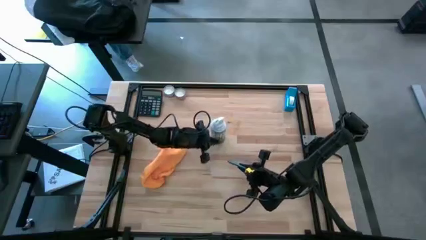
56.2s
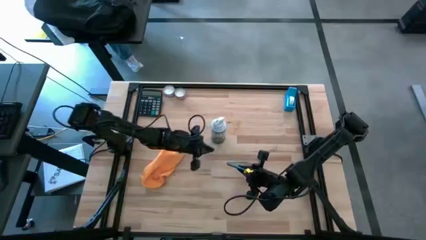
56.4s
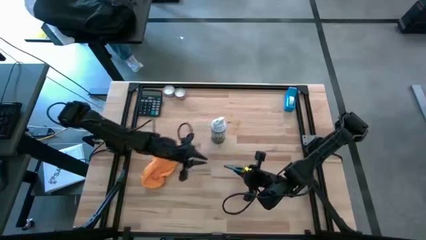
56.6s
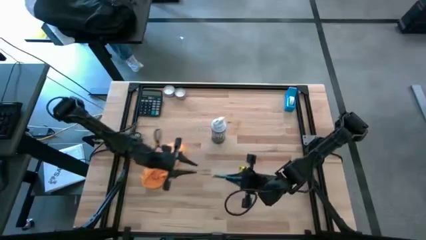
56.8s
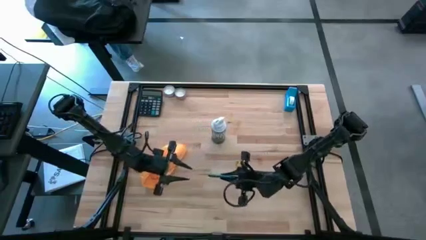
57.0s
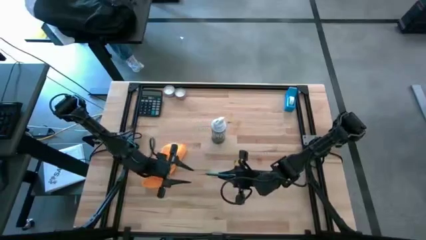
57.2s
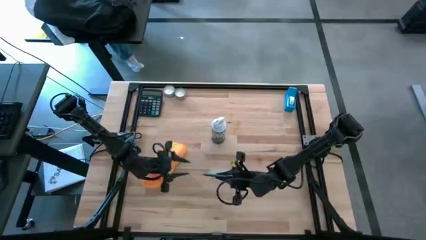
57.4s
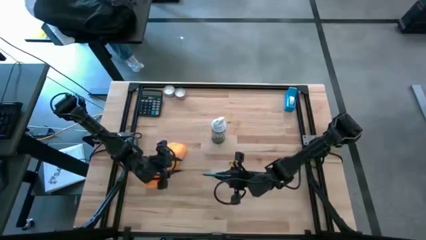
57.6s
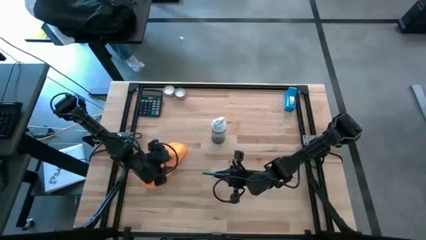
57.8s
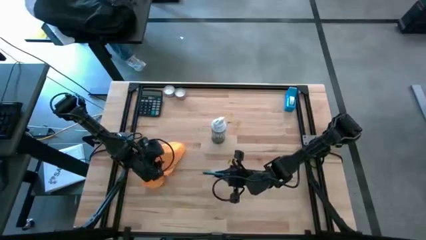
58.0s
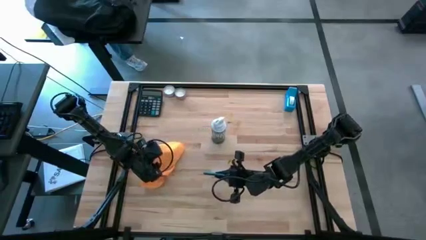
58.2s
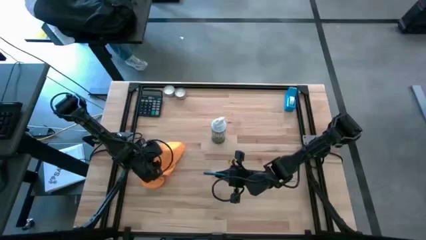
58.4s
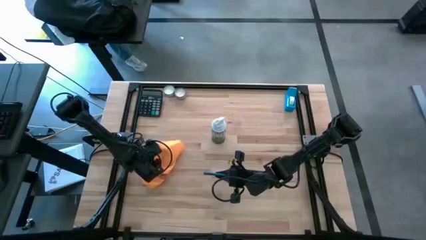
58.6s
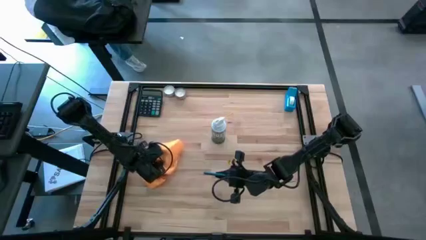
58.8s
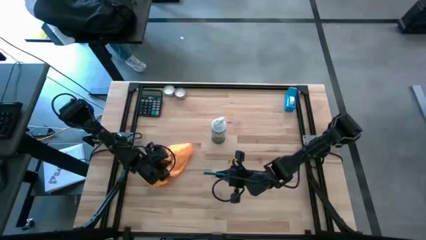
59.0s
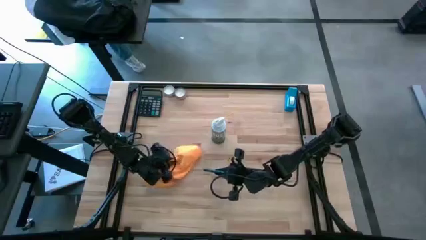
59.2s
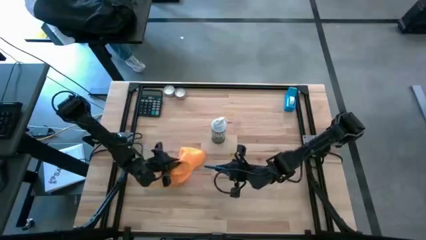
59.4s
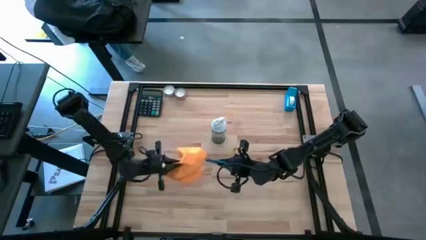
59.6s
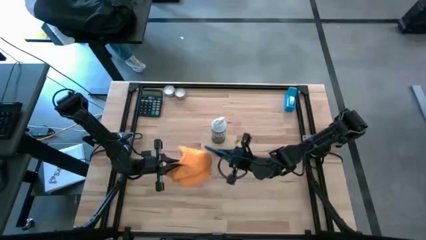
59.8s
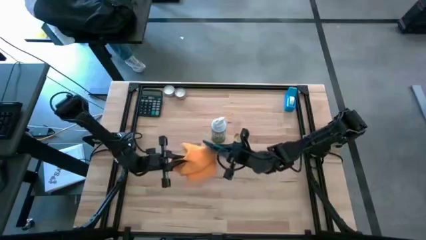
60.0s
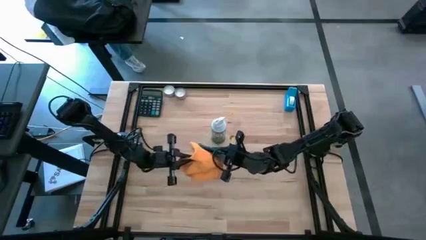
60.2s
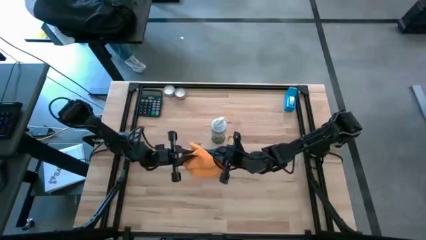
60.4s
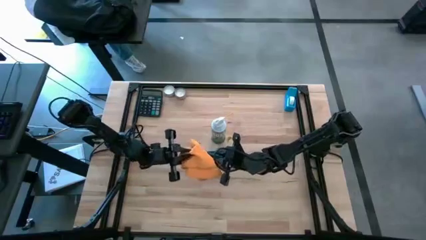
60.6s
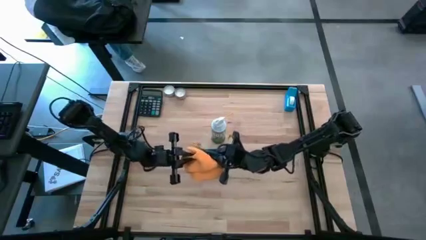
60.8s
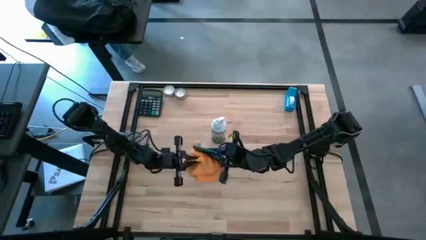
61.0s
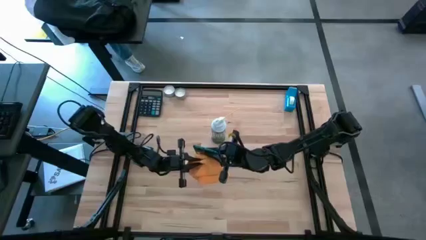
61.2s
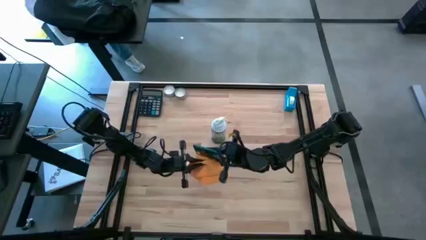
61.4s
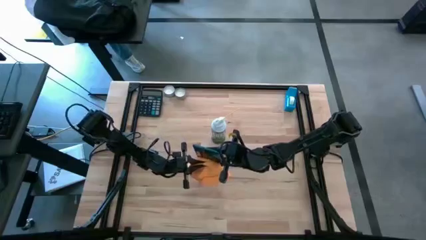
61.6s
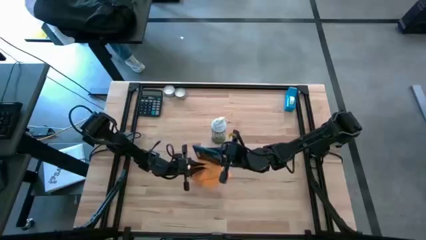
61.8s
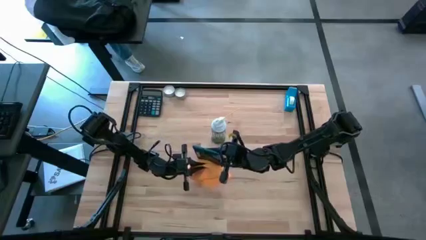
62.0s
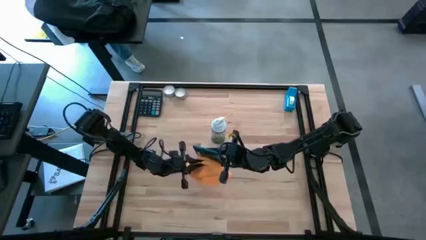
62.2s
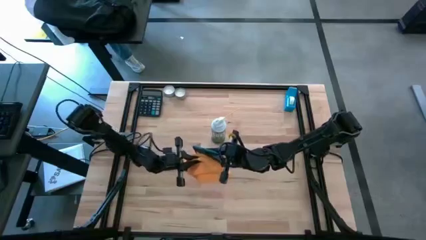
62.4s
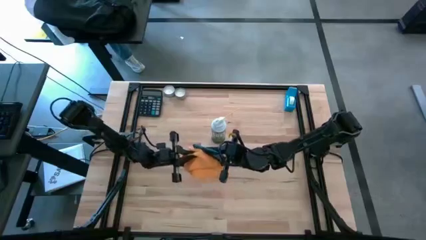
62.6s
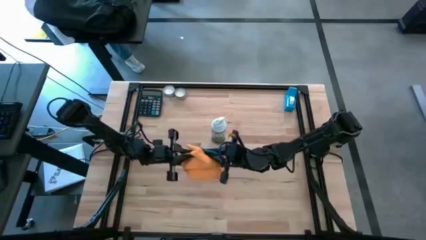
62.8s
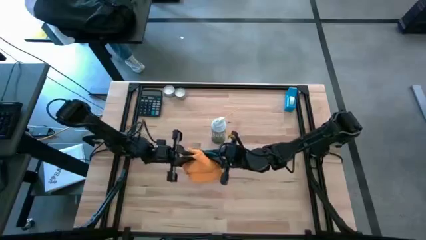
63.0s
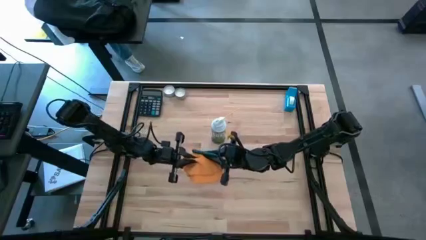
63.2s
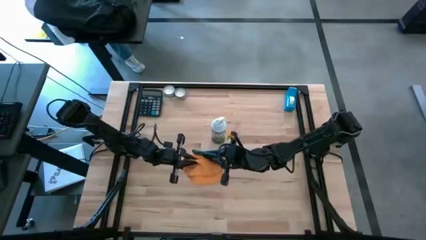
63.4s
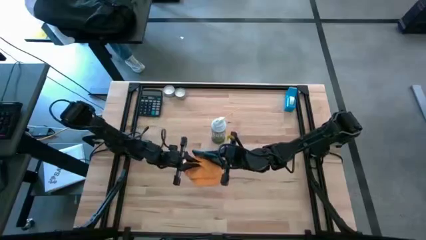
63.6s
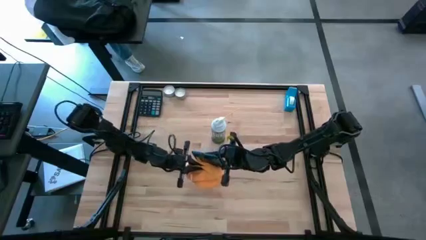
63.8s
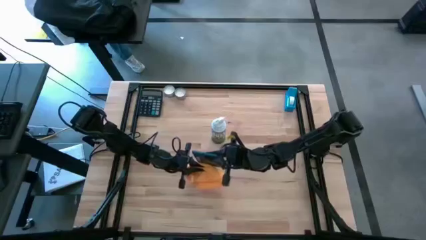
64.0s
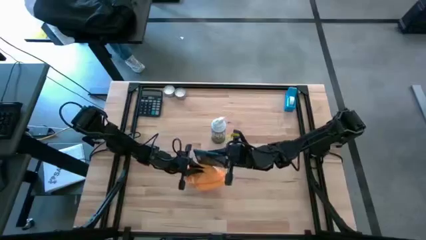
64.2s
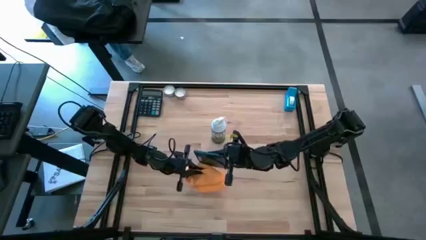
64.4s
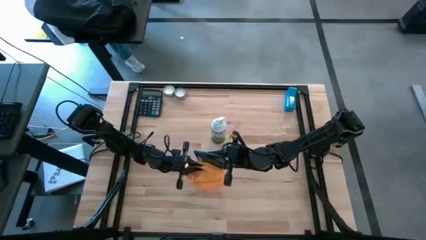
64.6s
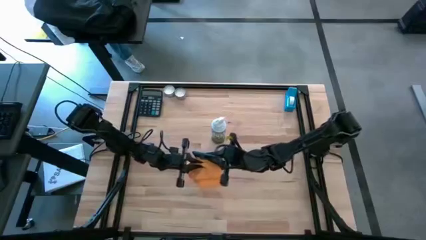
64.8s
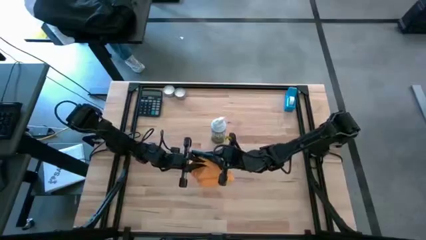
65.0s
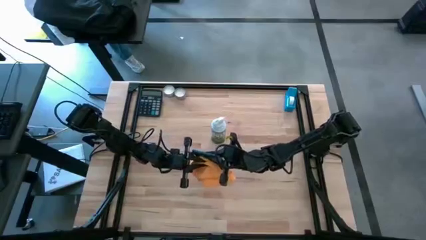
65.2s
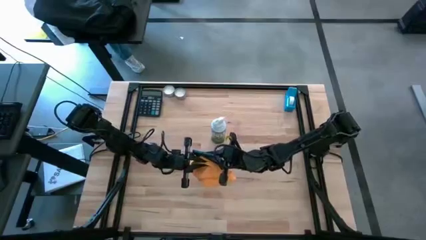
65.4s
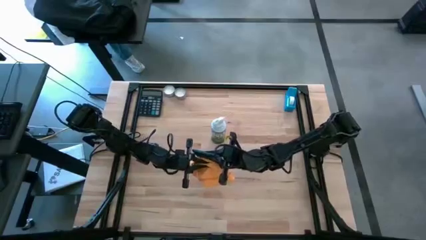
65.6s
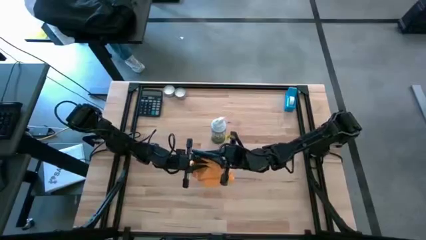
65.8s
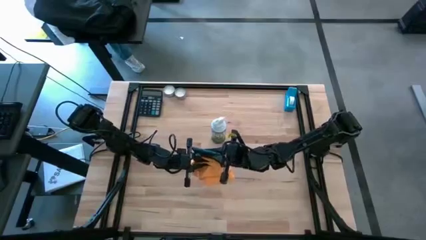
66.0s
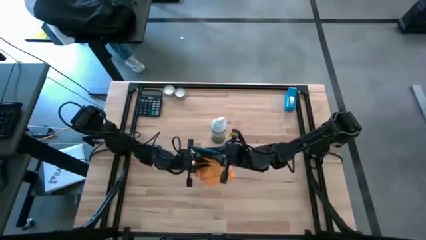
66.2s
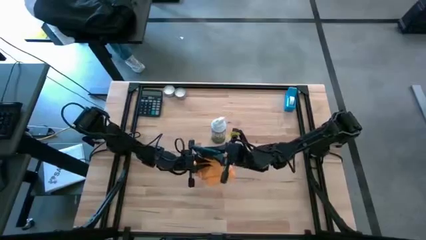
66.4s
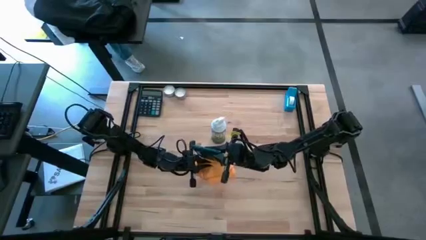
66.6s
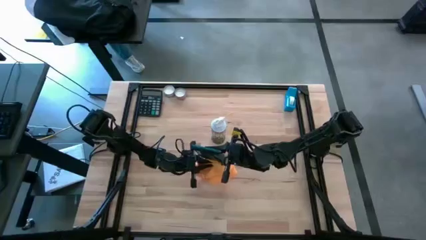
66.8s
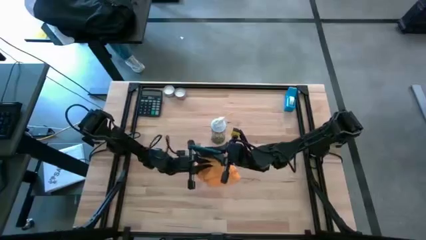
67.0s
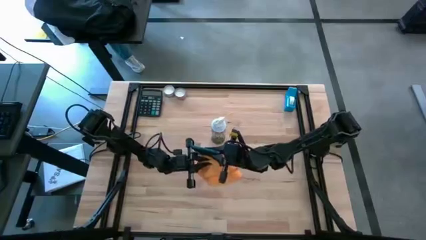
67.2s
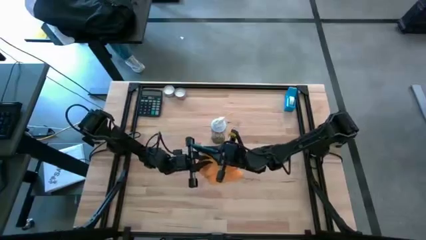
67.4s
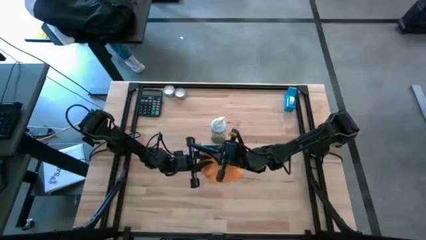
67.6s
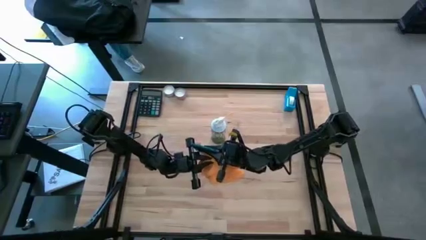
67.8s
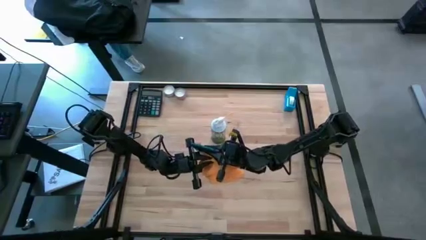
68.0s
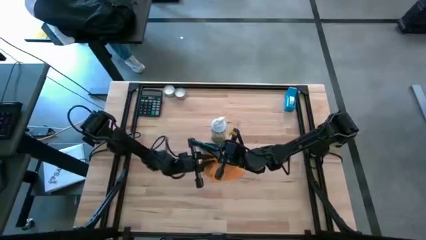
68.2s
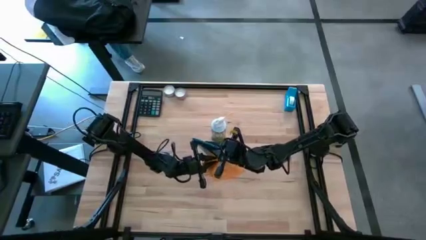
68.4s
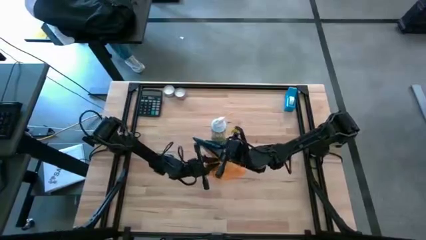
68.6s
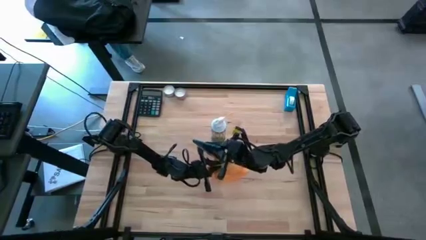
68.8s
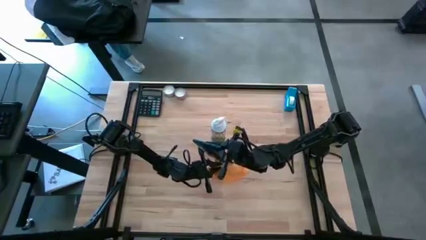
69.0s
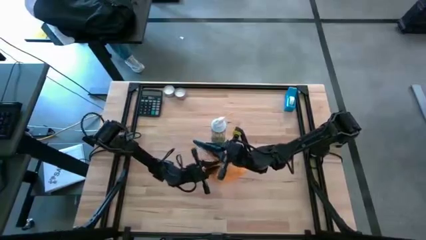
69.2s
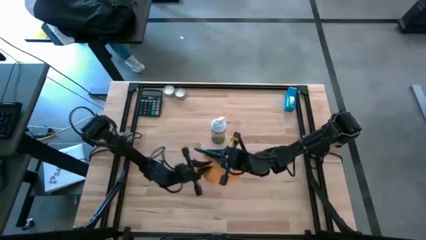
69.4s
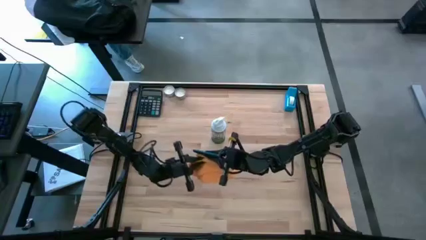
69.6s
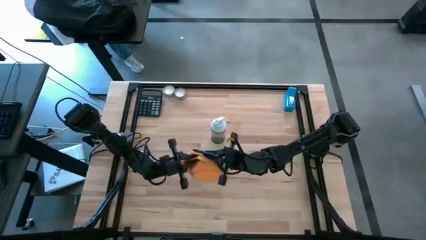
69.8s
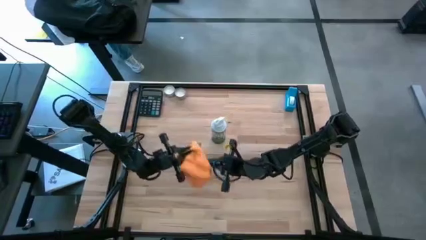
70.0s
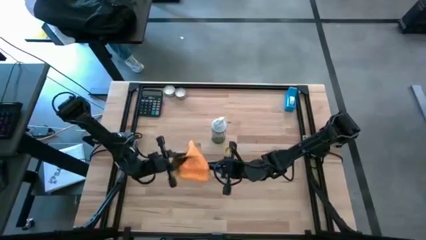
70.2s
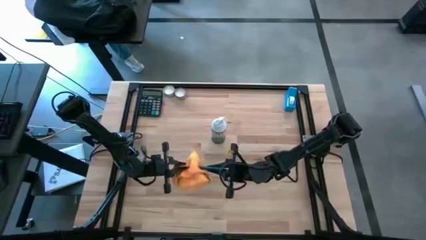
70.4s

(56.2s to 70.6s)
Task: Apply microfiber cloth
Wipe the back of the blue tablet using the orange microfiber cloth

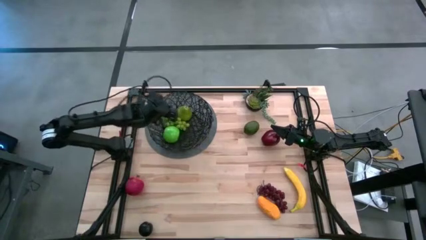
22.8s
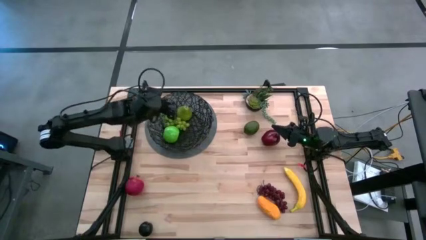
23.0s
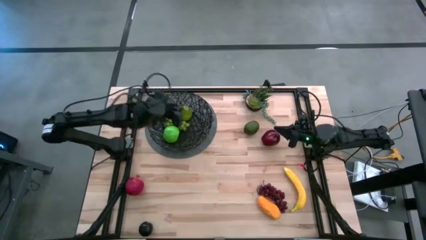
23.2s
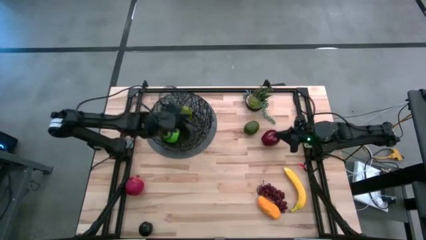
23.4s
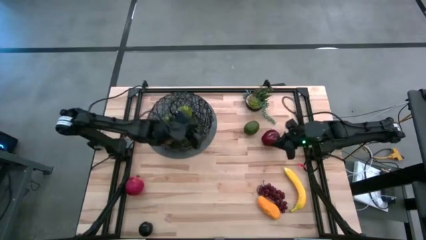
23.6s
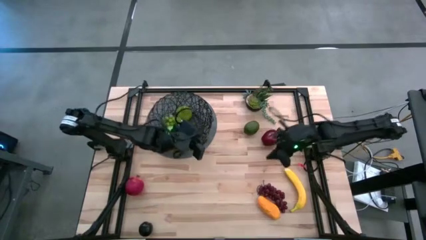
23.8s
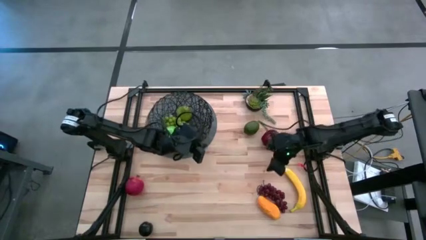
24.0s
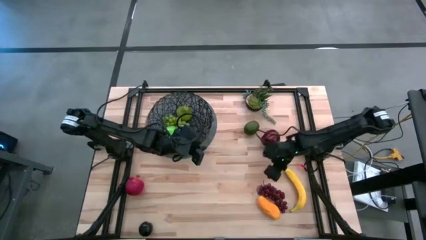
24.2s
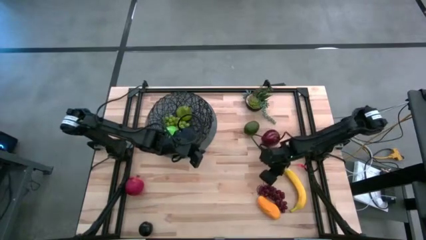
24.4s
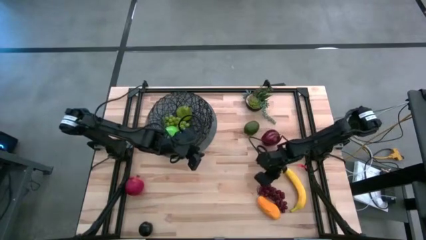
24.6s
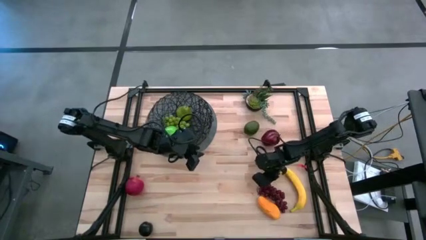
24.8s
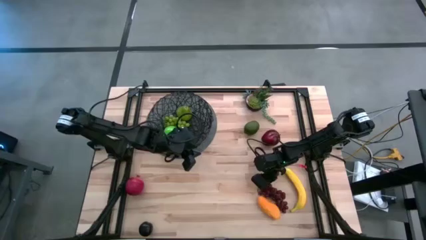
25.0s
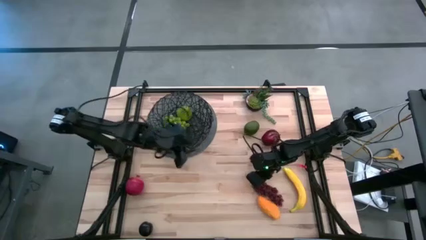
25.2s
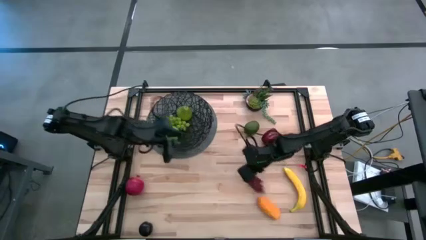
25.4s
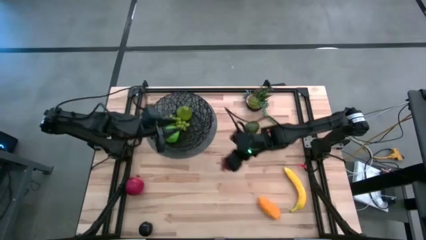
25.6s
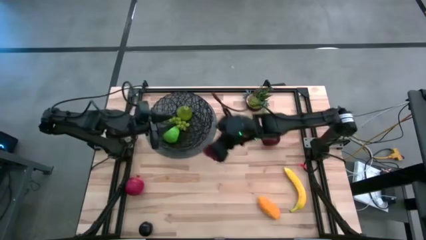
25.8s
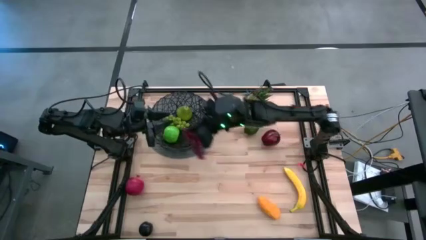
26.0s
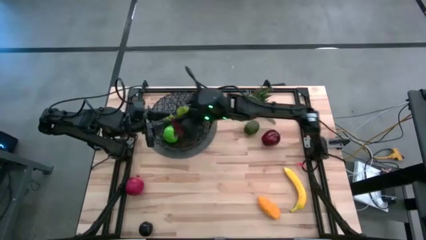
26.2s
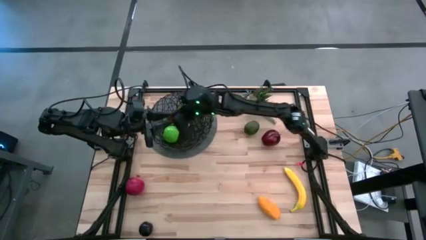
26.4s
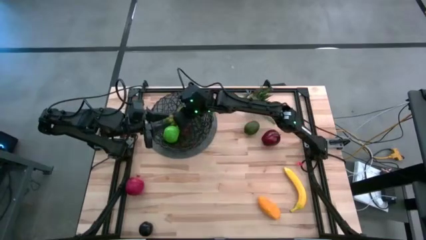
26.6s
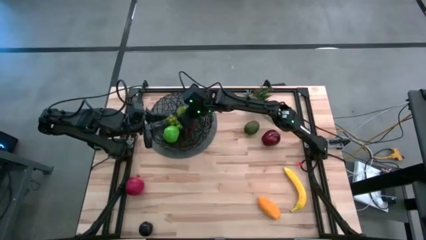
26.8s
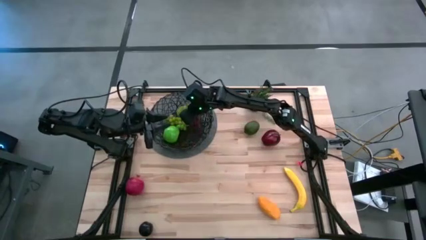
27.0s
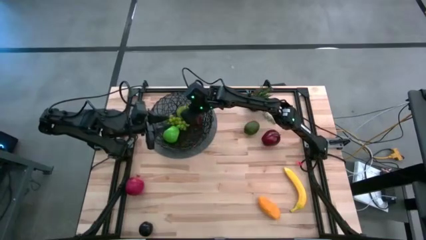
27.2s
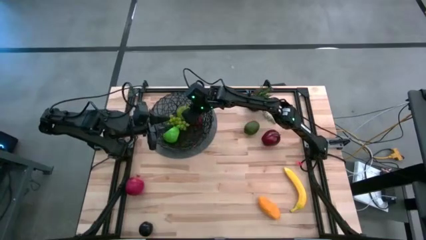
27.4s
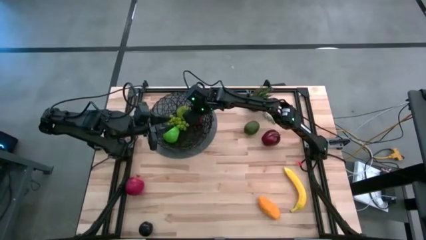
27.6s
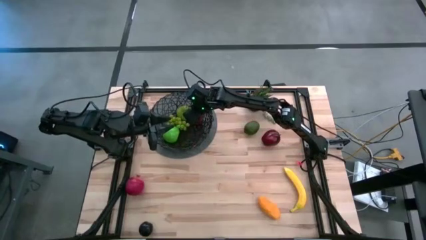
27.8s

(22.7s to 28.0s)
Task: Build produce basket
Put the red grapes into the black wire basket
